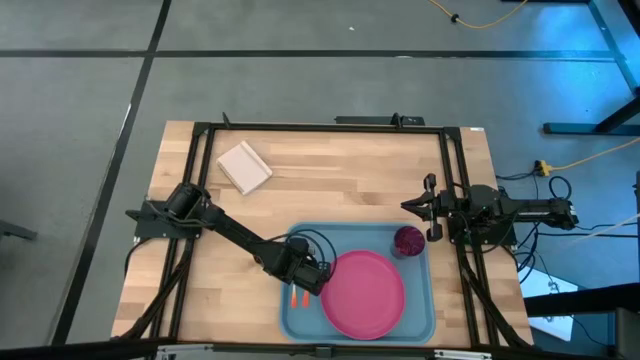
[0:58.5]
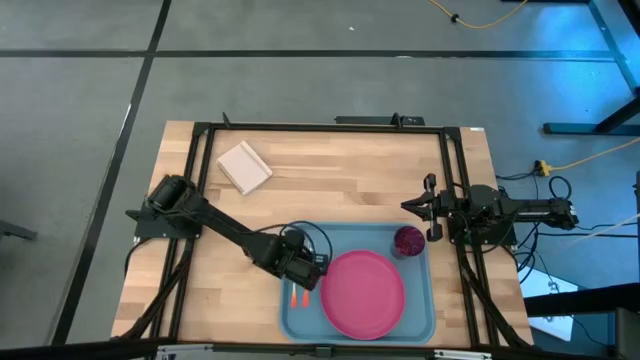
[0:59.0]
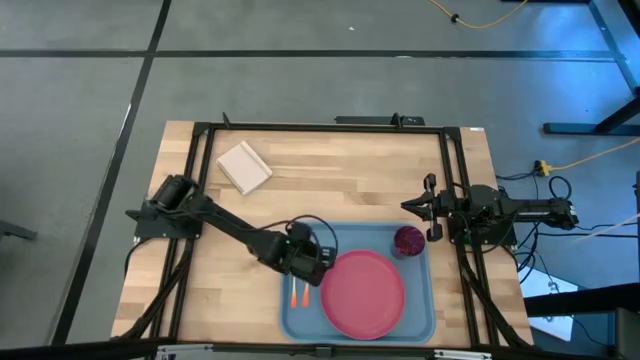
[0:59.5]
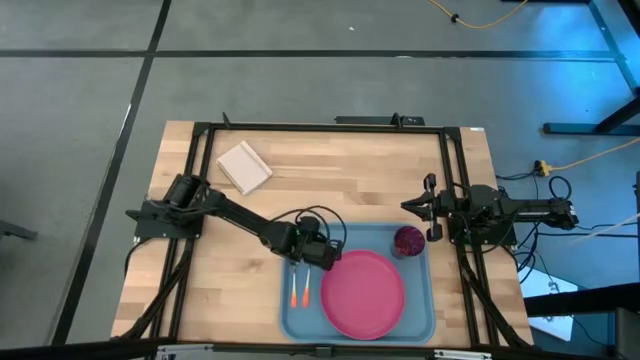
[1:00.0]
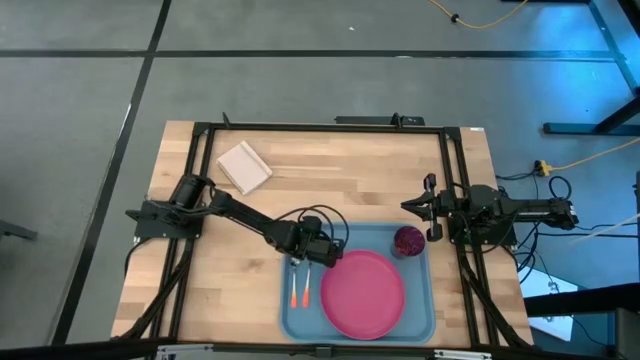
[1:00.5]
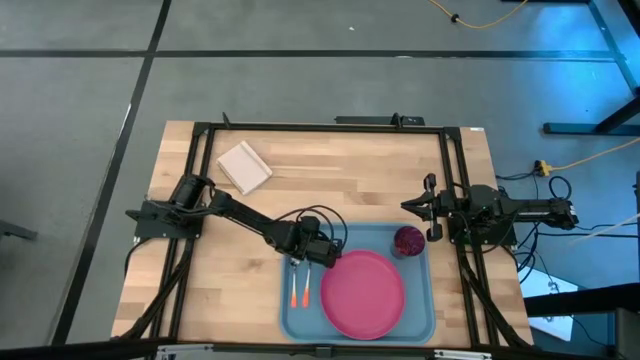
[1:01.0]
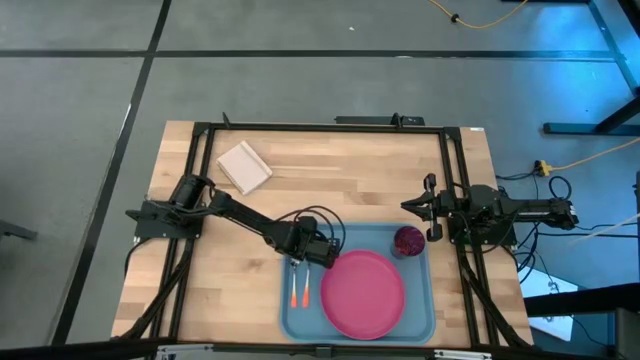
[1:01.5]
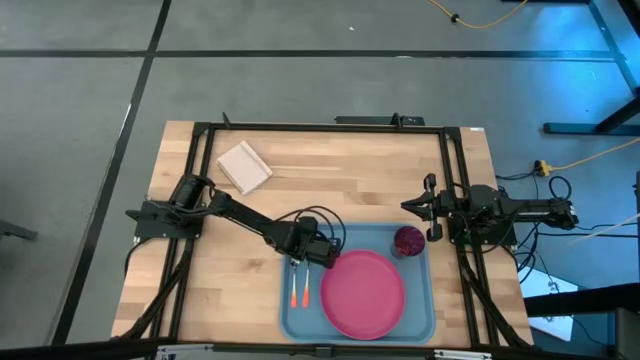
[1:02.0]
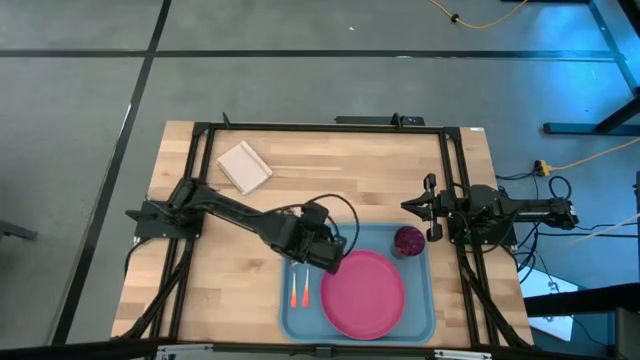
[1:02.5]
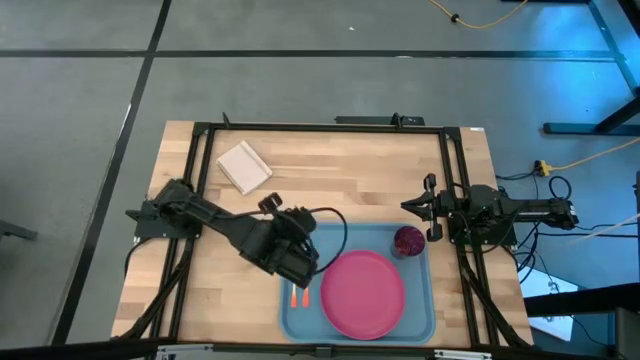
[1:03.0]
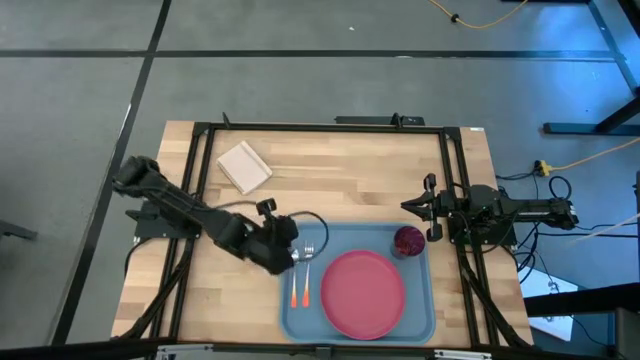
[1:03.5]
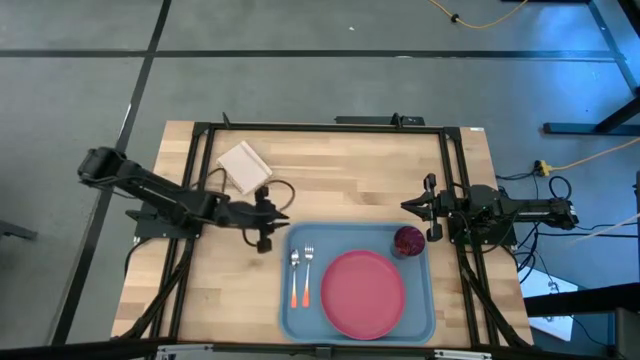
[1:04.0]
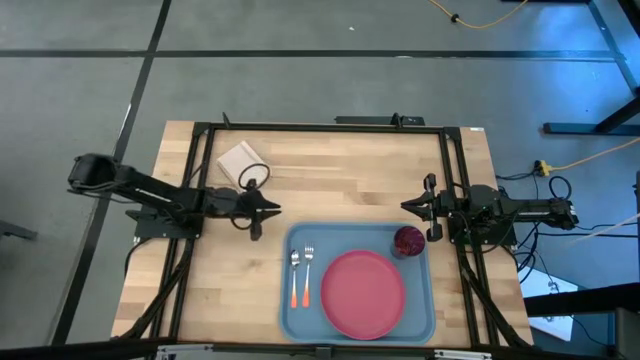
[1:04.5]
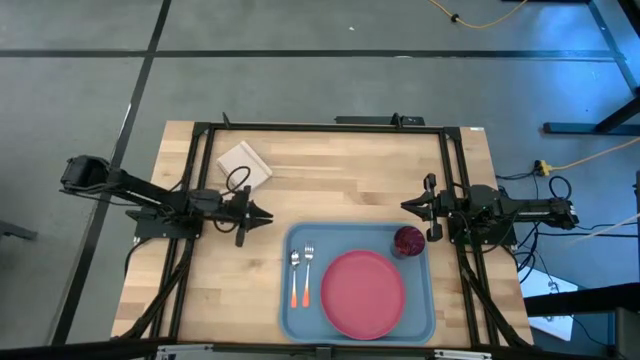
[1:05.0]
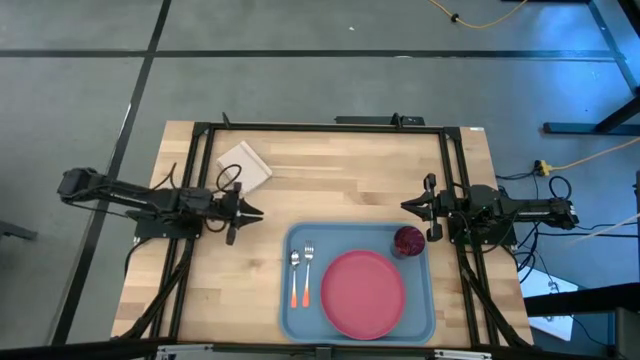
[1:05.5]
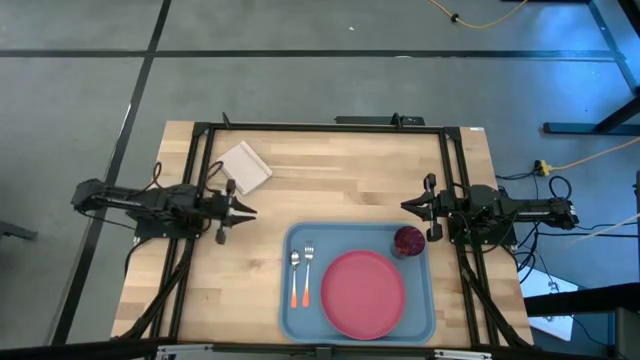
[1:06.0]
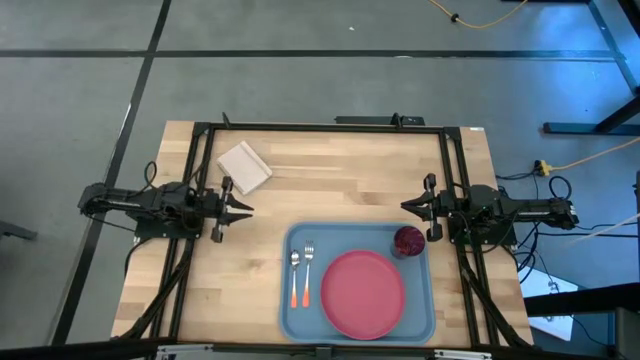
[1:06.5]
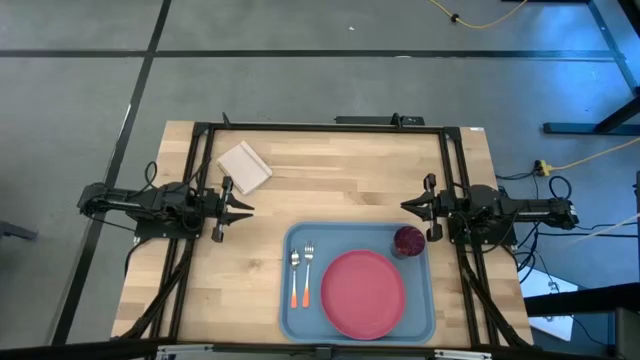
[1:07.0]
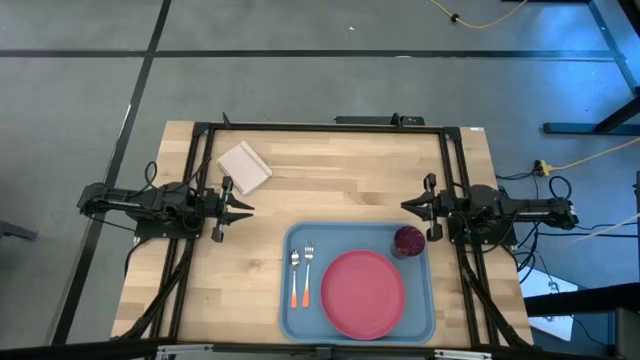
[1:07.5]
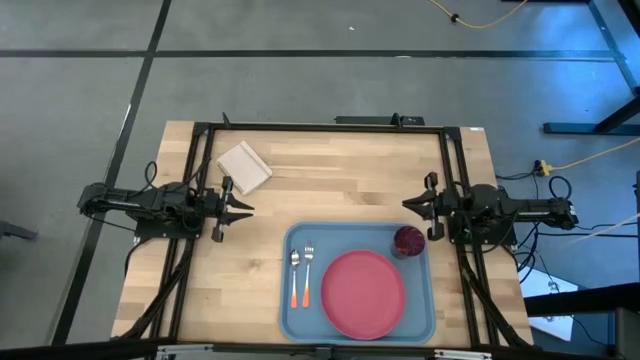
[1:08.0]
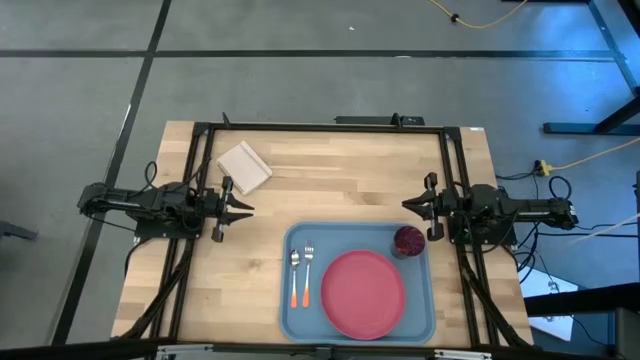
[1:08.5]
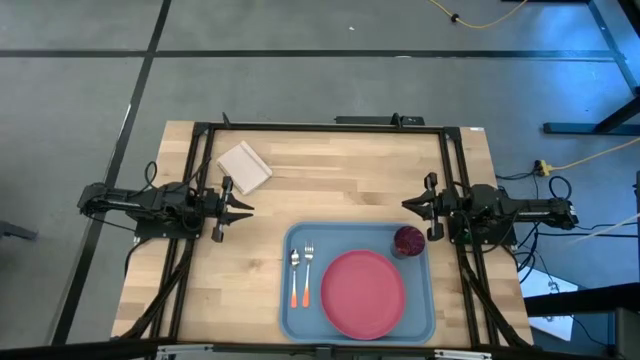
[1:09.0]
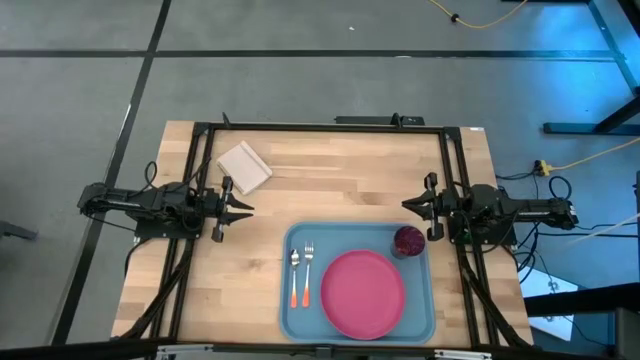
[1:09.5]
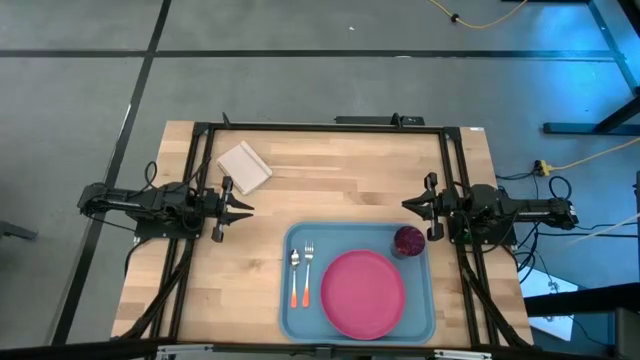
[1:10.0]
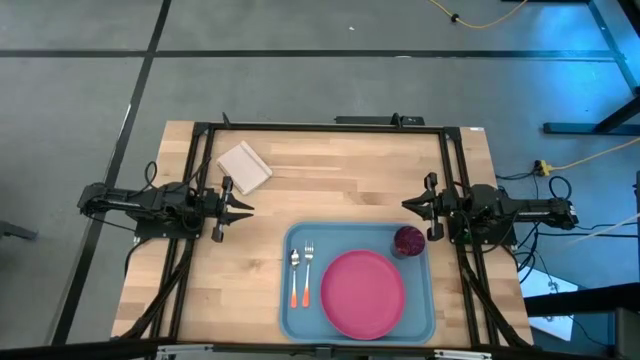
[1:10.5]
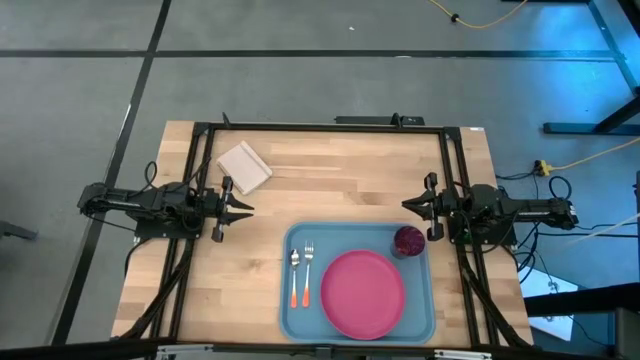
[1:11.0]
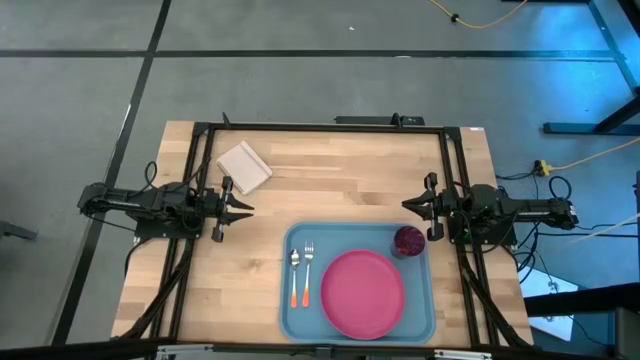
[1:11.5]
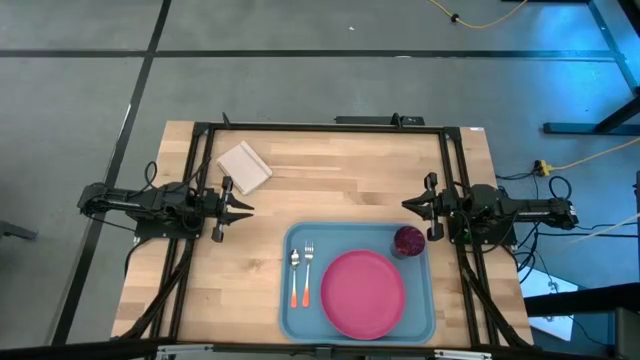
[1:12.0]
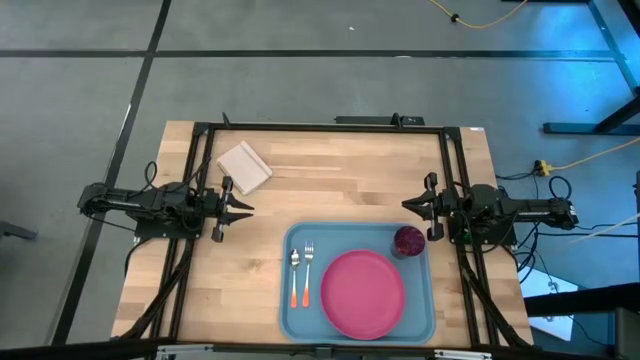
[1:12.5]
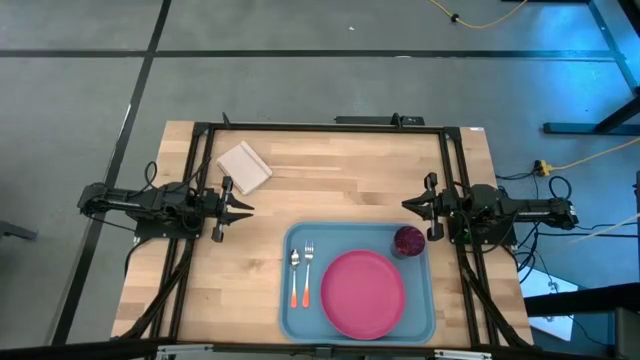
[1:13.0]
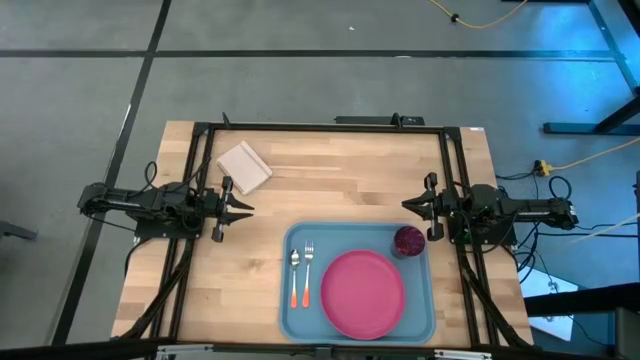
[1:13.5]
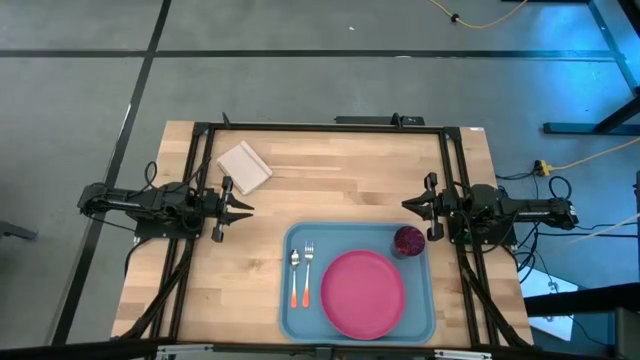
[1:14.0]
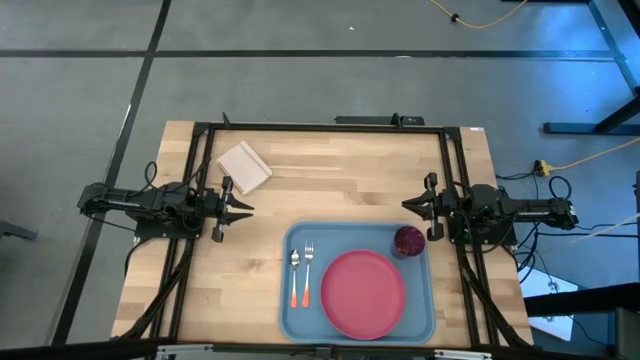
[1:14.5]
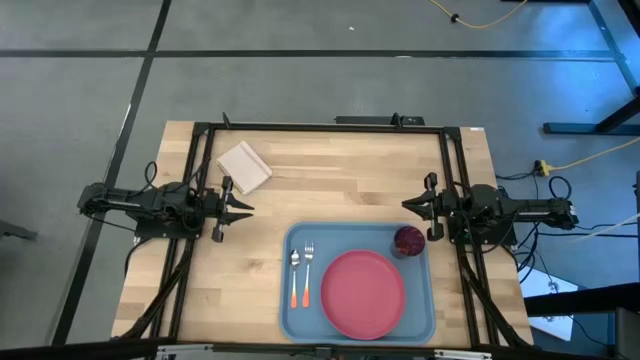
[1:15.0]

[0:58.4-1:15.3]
Task: Pick and place plate/cup/fork/spoon on tray
Return to Home Position

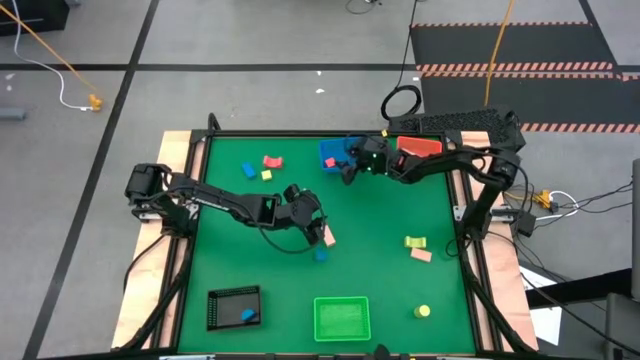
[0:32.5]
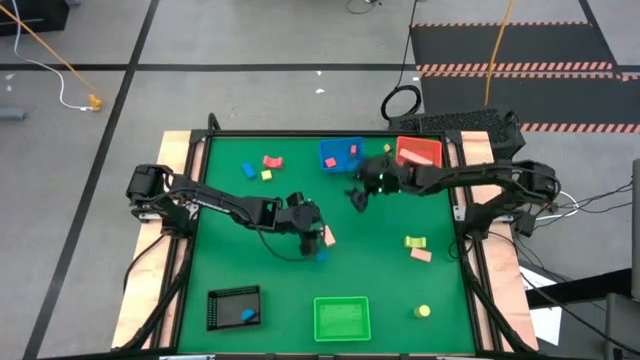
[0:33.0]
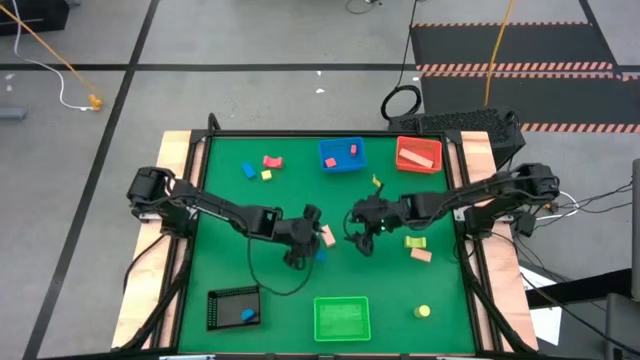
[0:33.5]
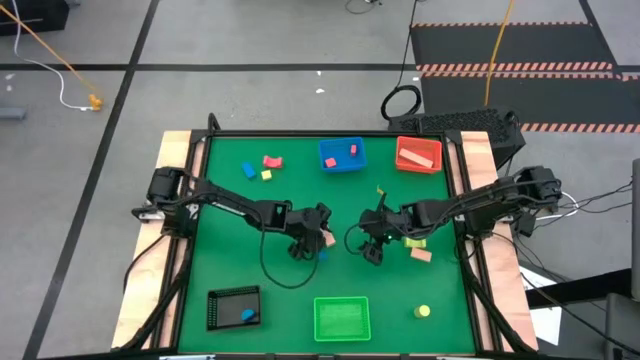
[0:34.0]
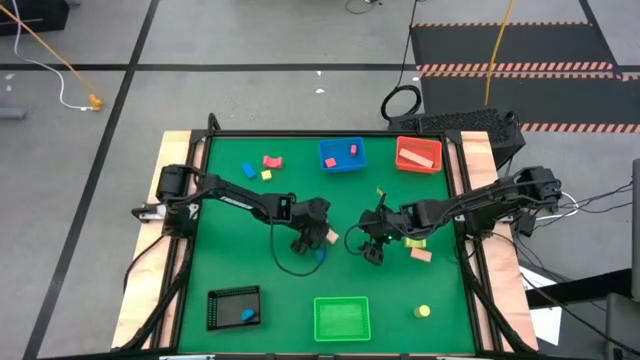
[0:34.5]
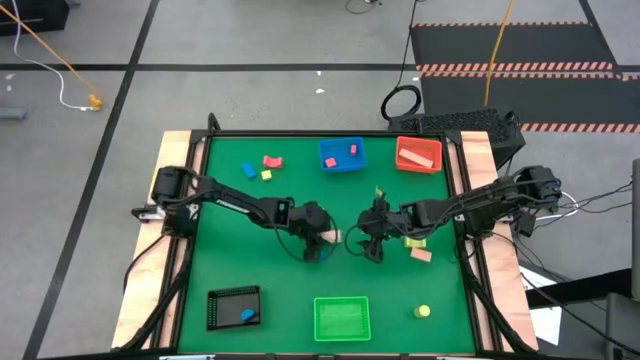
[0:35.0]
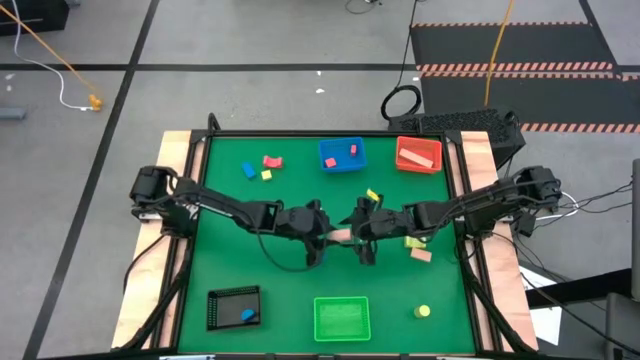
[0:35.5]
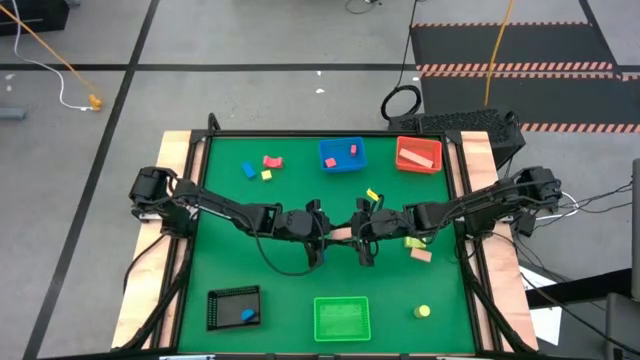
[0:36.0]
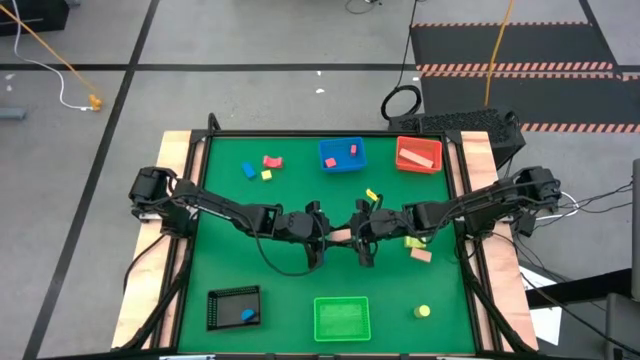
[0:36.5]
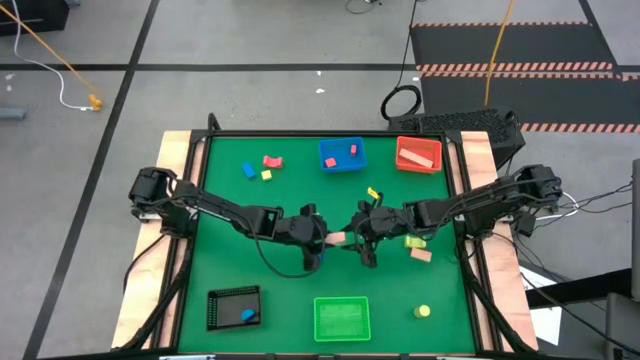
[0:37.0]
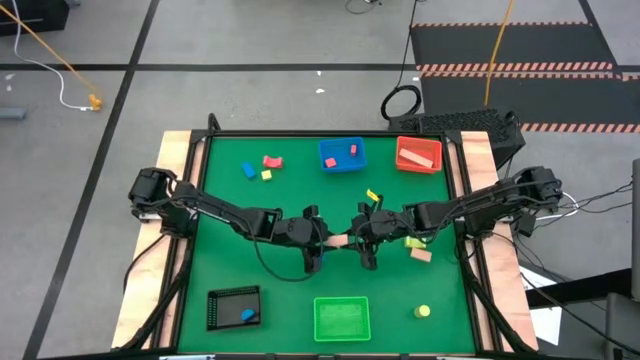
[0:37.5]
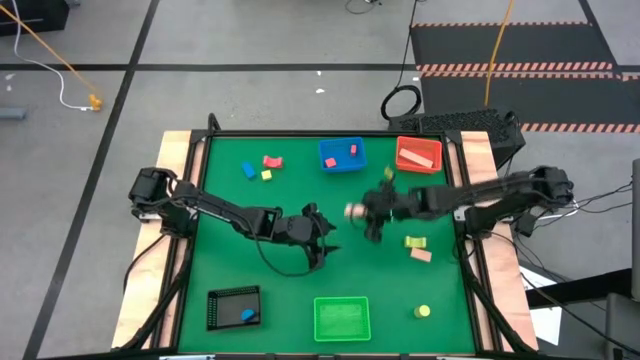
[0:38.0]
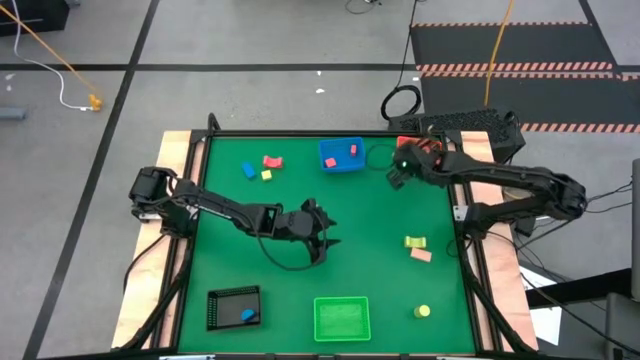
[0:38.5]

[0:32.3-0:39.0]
Task: Sort & place blocks by color
Put the brown block into the orange bin
